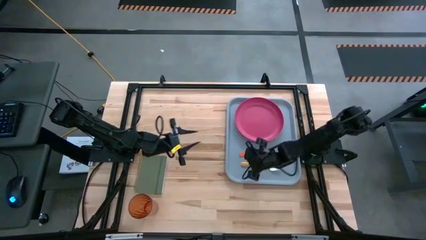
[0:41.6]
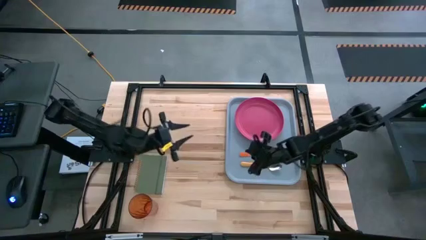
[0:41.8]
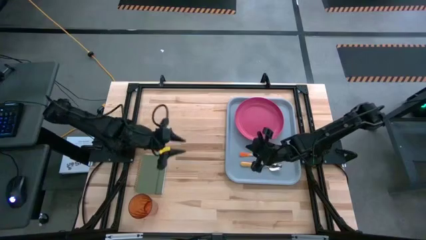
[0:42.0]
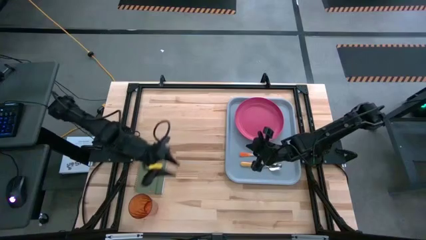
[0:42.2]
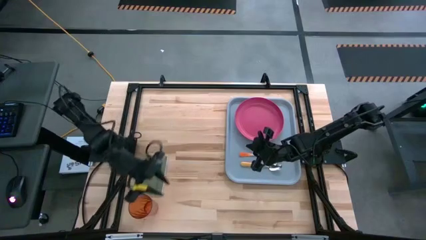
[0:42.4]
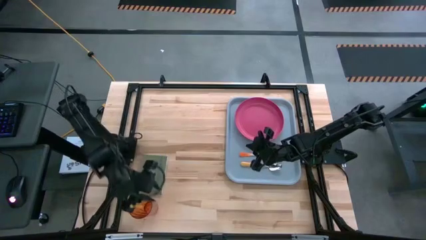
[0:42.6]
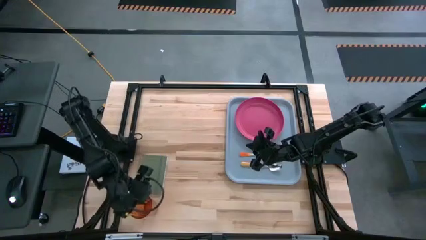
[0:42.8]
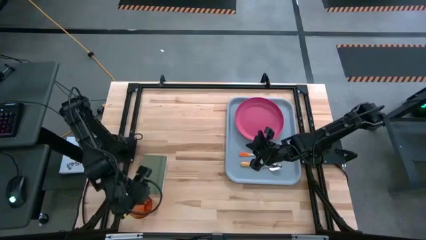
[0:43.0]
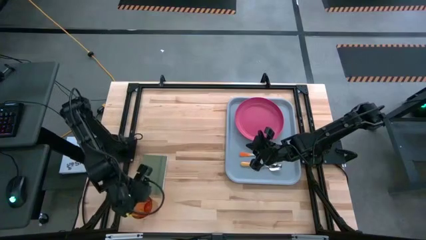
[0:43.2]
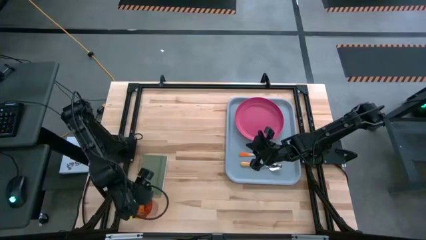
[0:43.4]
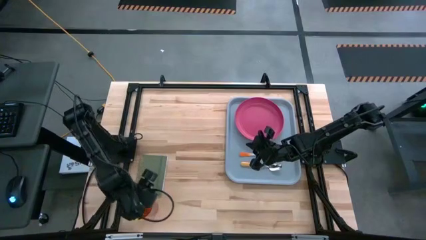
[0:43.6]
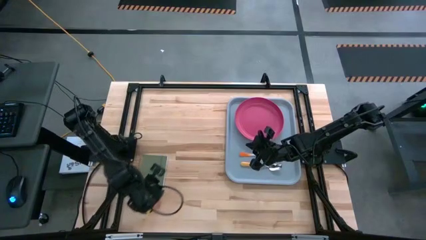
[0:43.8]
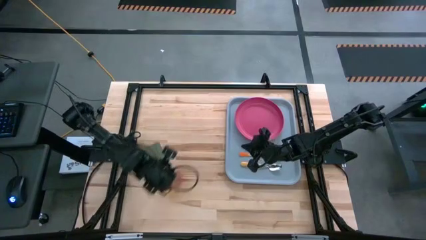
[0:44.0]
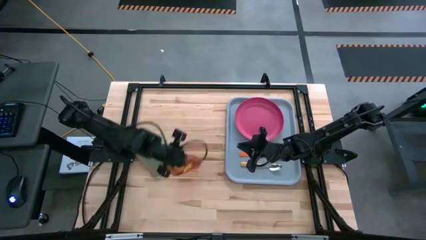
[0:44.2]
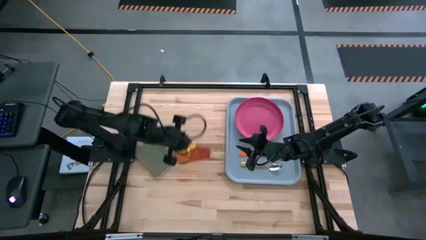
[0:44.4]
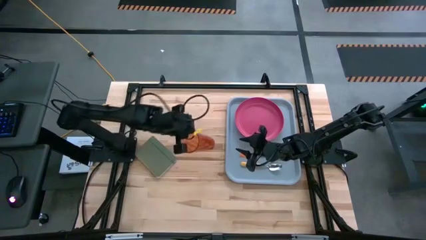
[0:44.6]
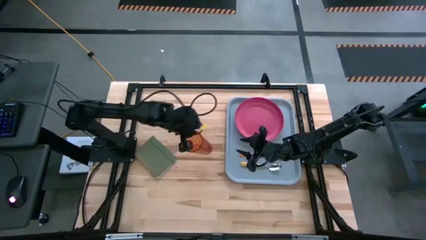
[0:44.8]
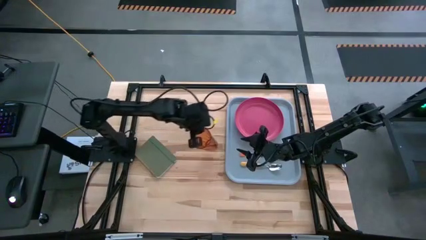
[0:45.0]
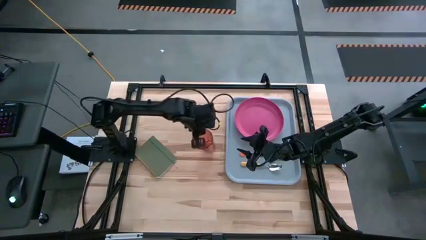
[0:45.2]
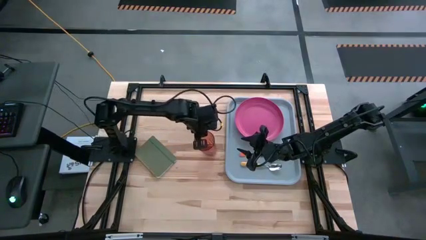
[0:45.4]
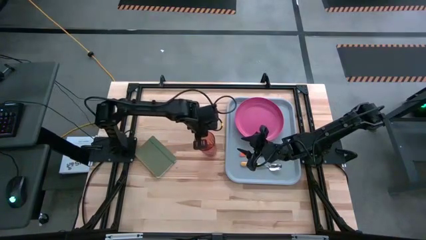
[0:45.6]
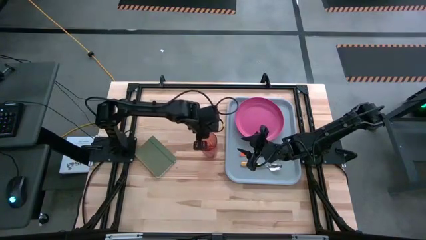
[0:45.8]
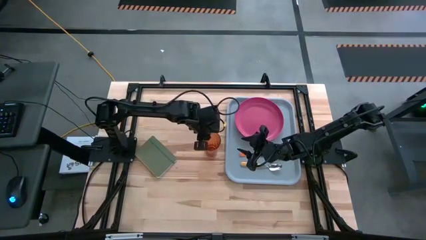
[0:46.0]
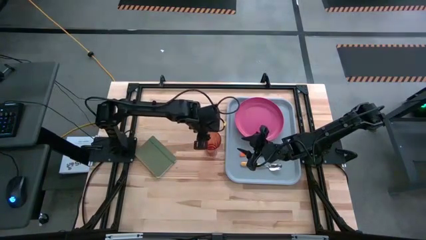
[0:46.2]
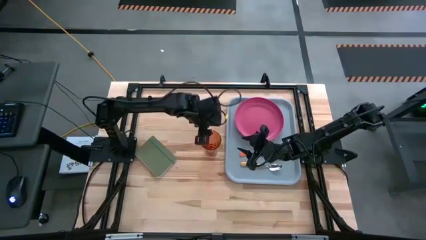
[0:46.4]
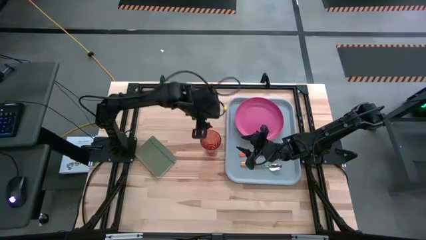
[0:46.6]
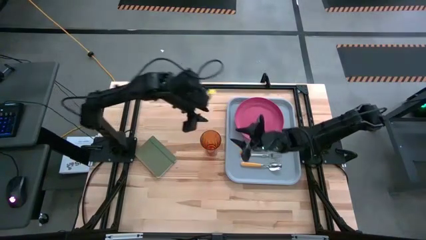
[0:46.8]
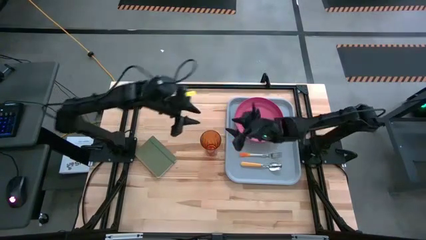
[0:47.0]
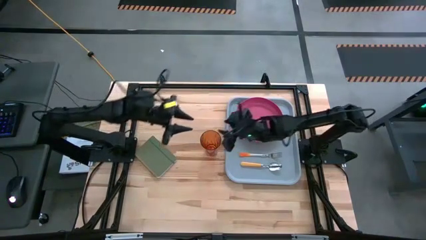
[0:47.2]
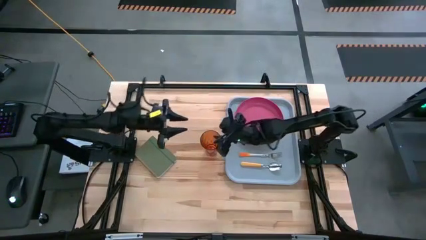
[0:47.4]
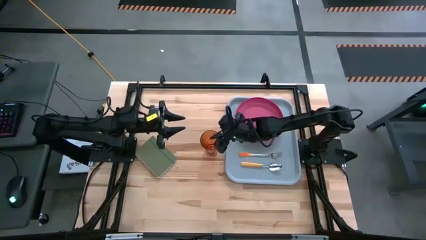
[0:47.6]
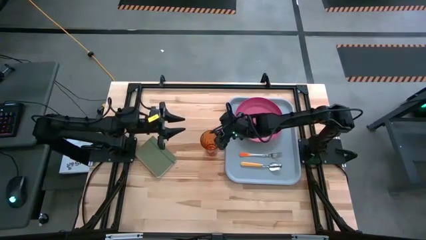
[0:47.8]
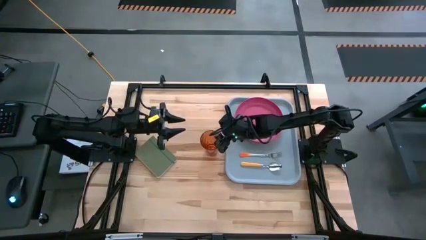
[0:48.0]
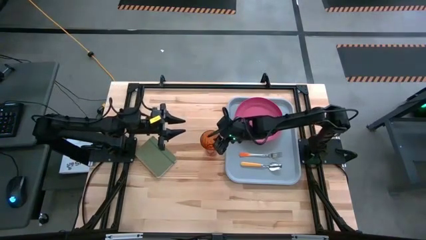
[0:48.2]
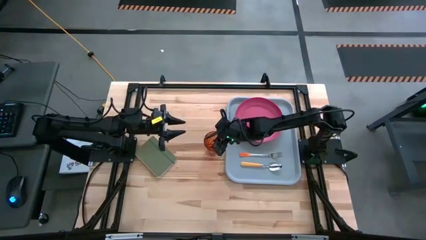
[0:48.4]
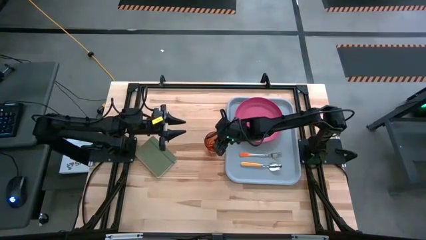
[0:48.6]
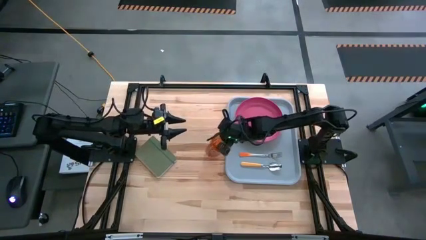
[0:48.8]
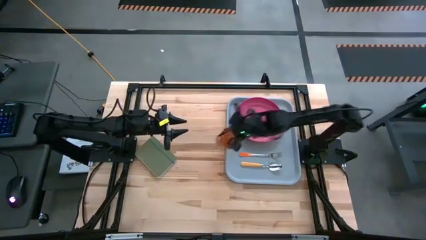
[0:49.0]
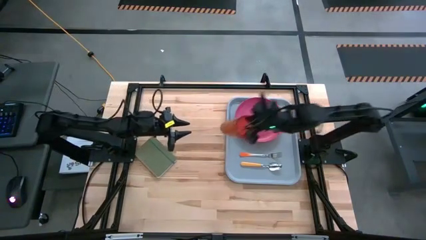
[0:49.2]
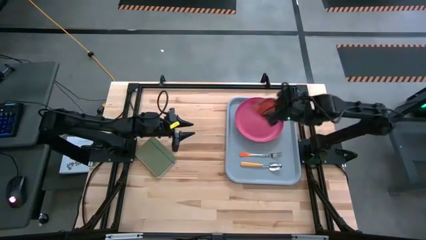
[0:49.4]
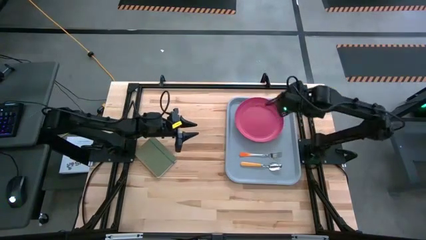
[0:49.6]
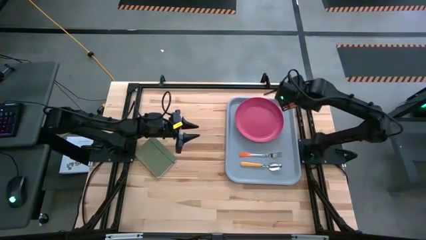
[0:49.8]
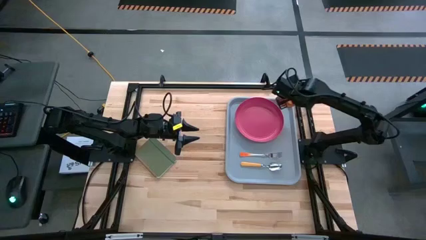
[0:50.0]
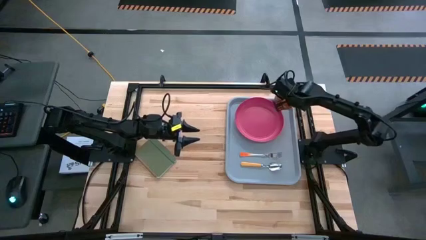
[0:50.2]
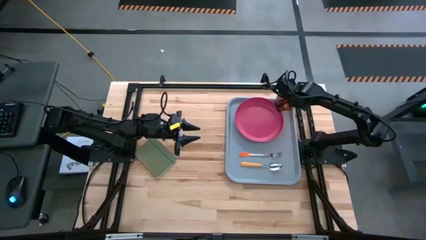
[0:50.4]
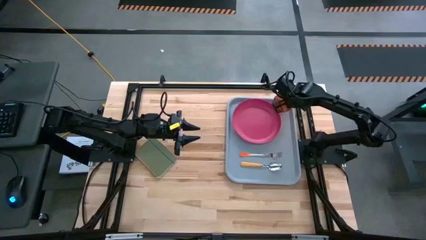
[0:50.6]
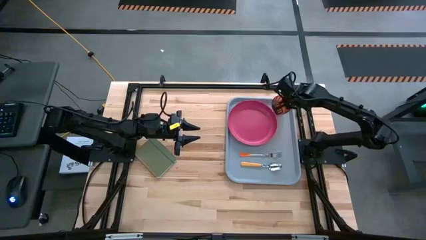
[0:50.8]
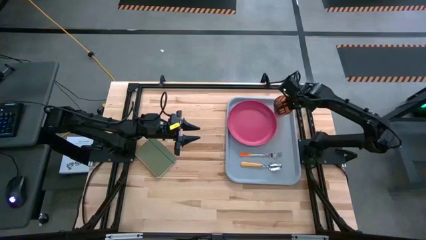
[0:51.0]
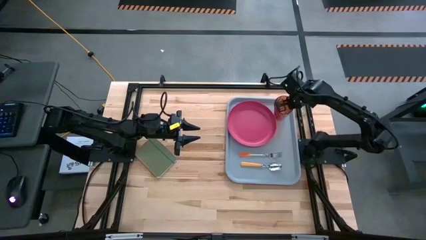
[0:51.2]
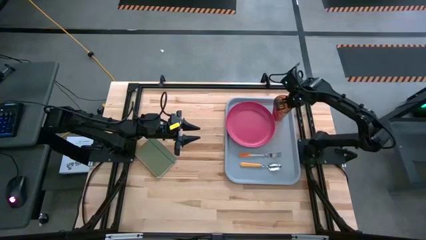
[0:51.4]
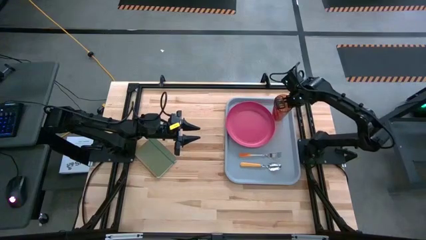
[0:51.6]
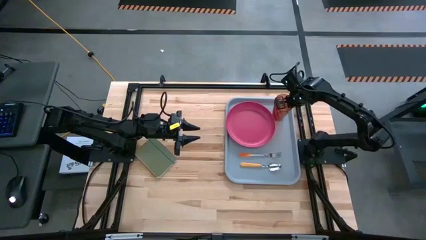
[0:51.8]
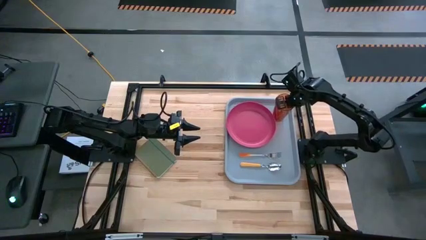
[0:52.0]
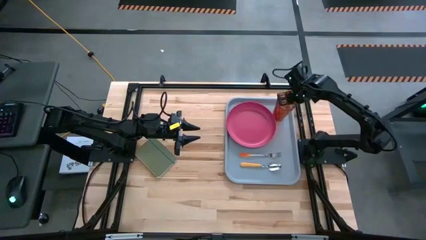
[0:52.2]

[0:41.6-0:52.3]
Task: Pick and place plate/cup/fork/spoon on tray
Put the red cup to the top left of the pink plate on the light blue tray

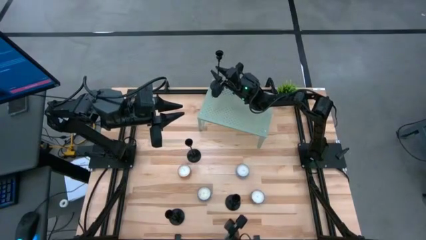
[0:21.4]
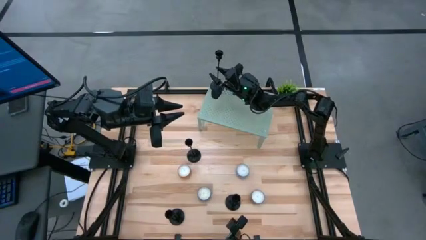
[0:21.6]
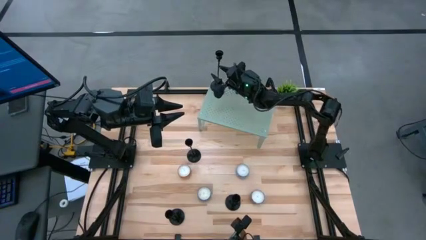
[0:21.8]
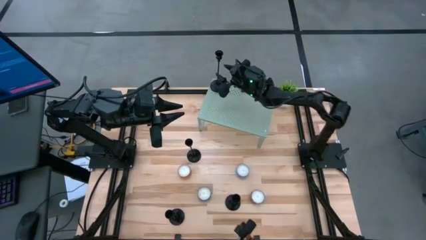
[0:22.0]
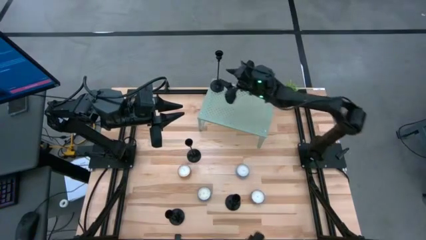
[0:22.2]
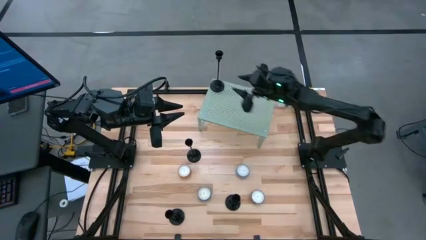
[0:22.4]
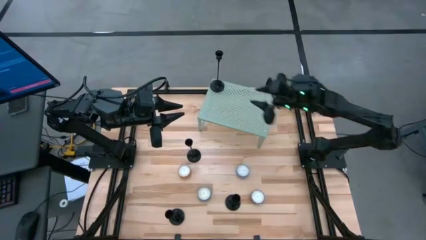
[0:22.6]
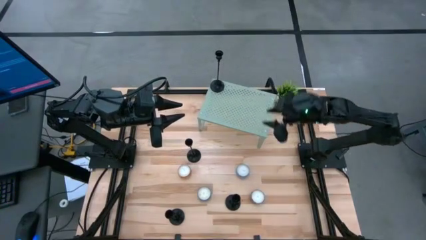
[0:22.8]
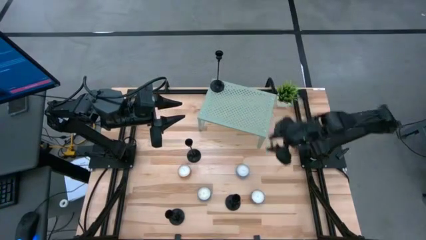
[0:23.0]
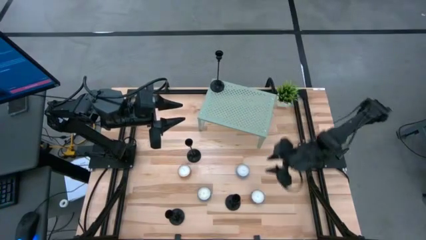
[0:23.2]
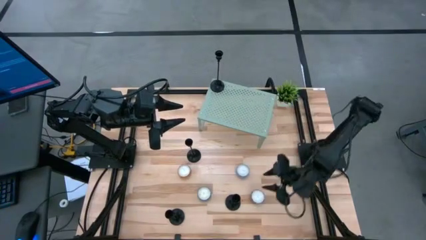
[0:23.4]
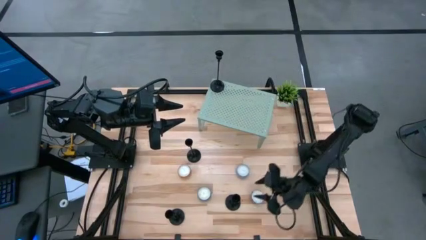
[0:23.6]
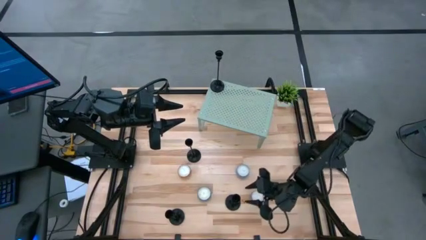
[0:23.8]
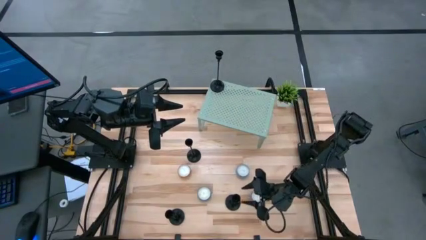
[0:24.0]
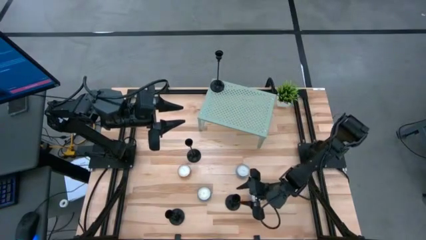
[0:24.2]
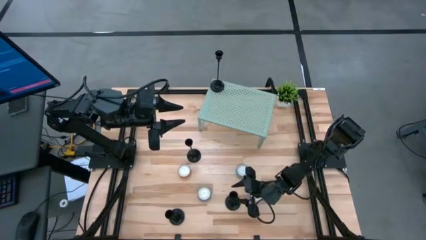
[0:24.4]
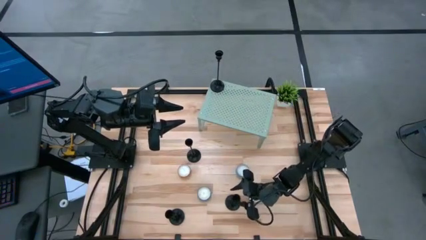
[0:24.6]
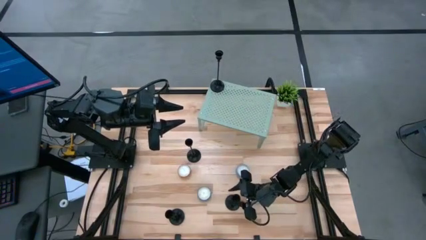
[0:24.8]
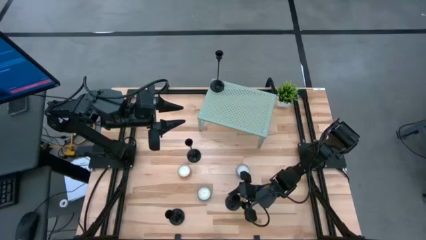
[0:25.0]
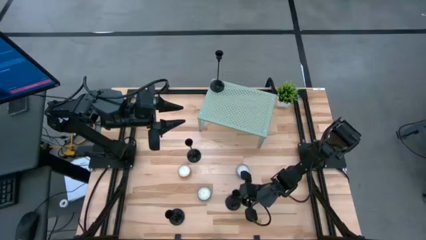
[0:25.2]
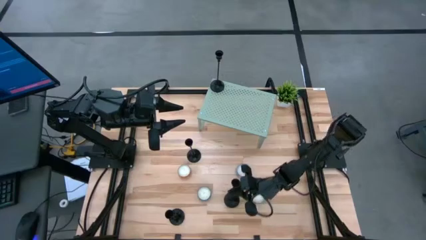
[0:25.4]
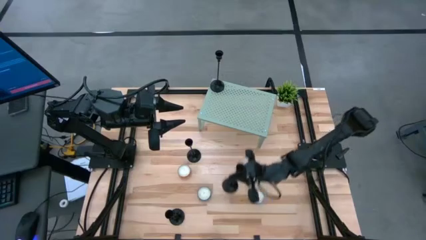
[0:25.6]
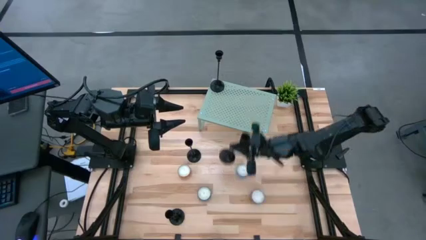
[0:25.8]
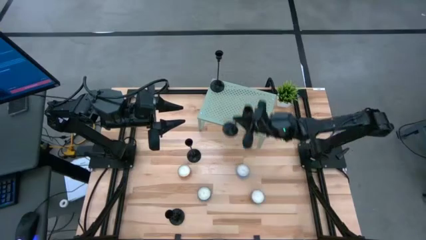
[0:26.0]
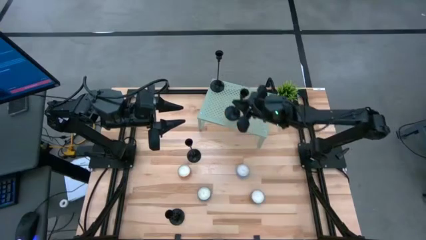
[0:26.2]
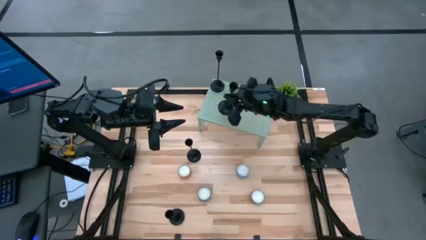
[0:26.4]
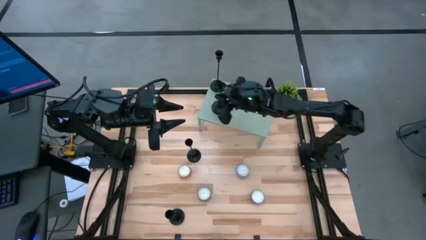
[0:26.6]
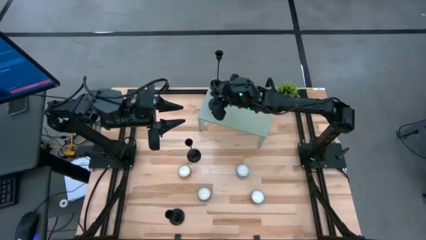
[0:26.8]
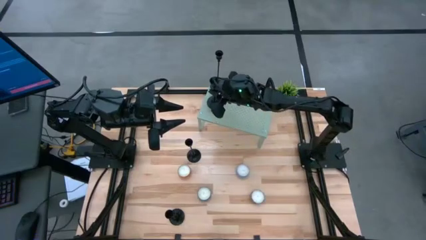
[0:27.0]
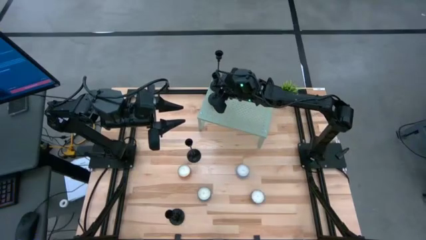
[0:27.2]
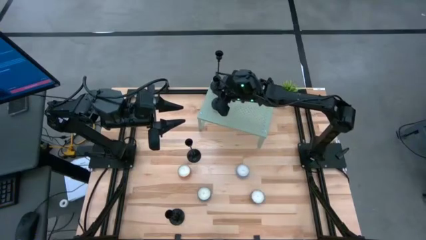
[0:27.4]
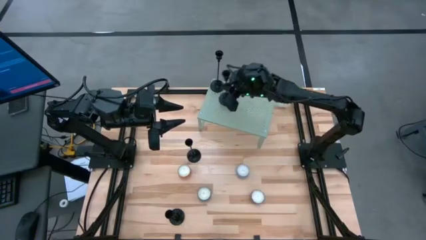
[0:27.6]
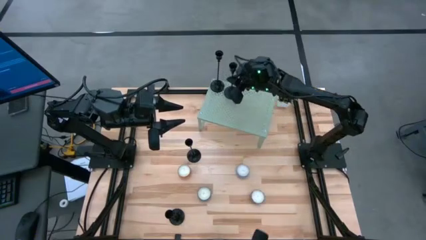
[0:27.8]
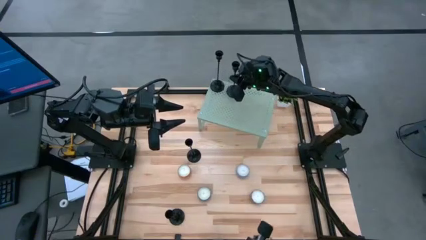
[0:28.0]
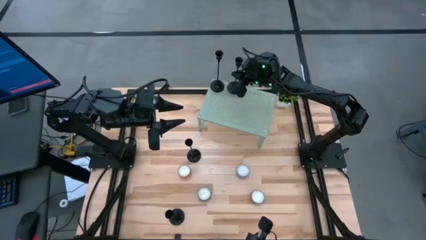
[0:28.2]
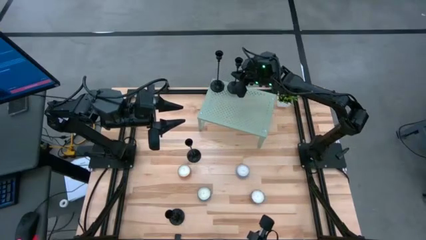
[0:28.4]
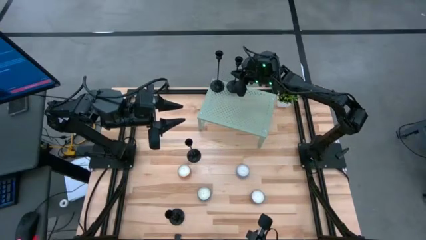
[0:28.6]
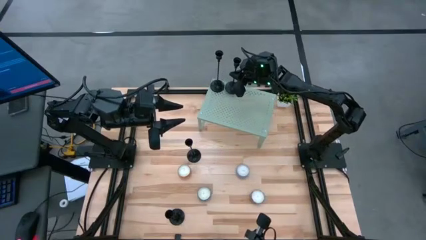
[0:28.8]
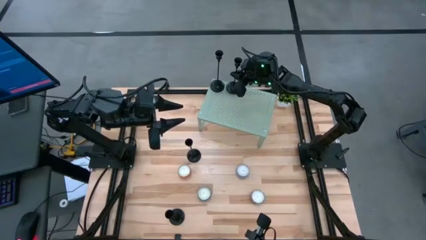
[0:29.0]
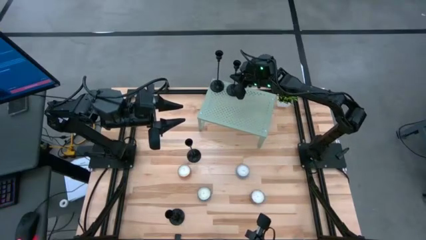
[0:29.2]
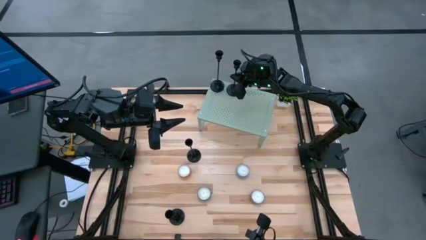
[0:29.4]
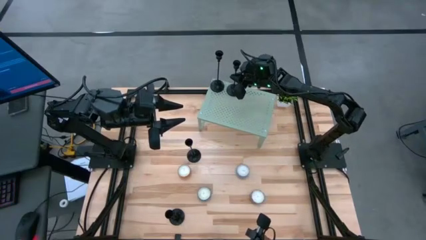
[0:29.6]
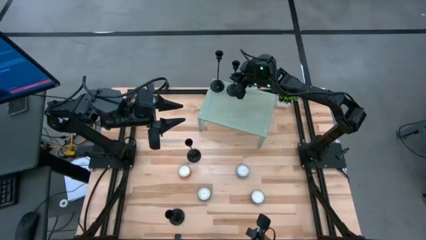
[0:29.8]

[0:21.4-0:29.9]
Task: Pick & Place candle stick holders
Put the black candle holder on the shelf
